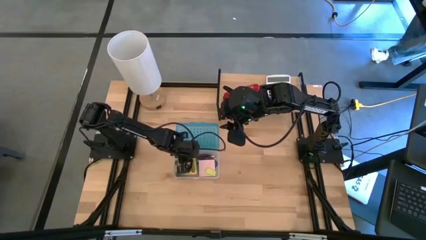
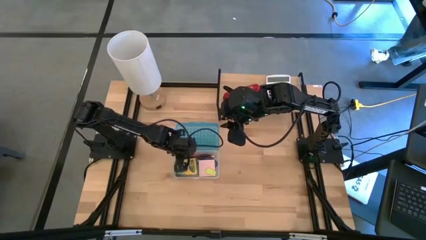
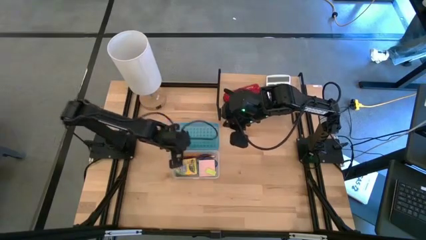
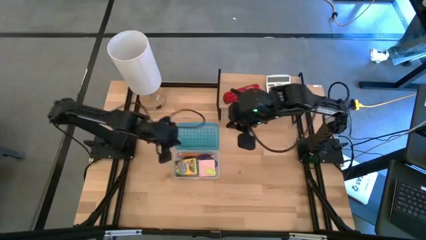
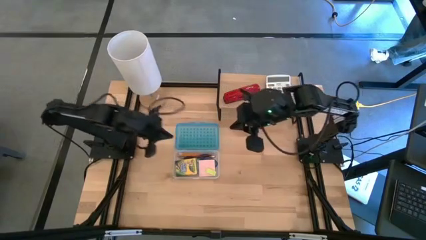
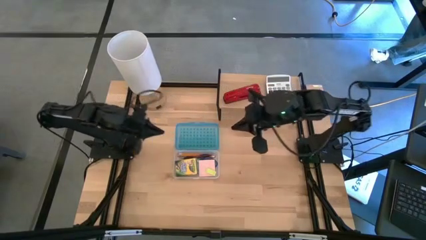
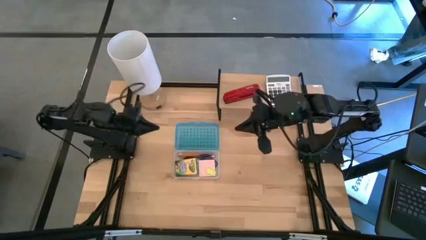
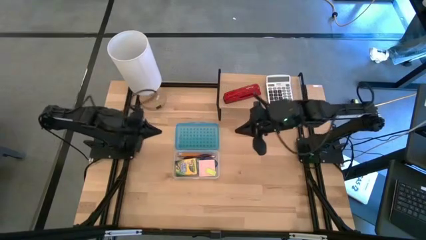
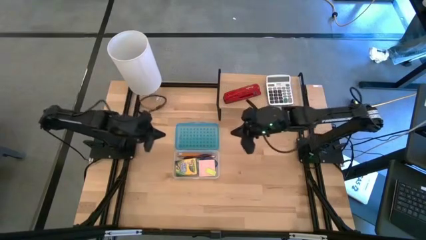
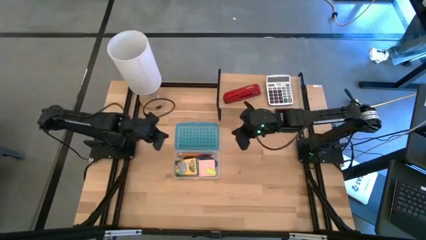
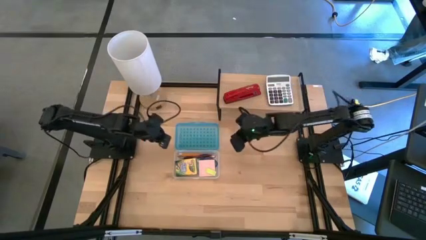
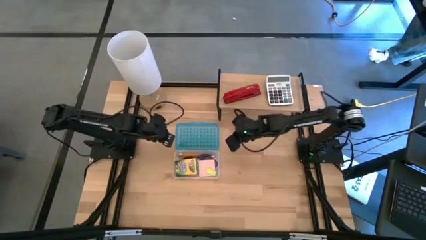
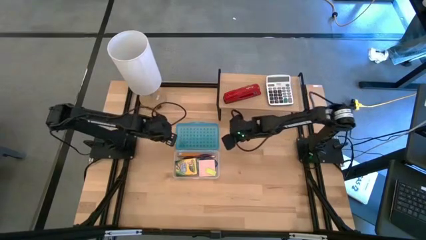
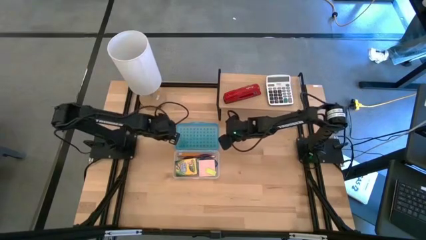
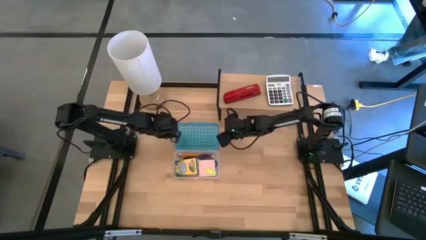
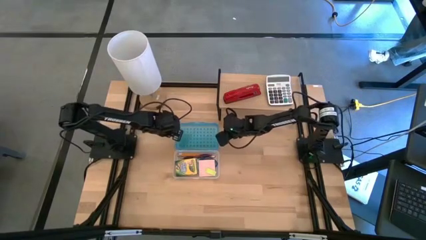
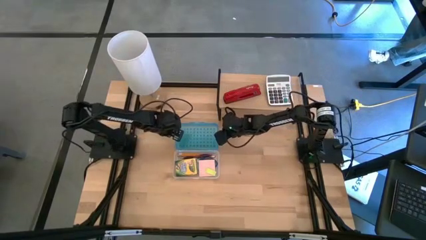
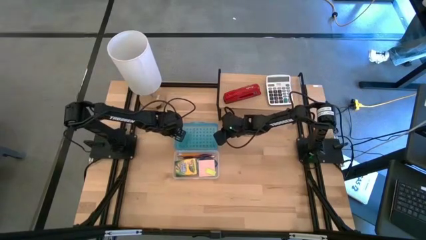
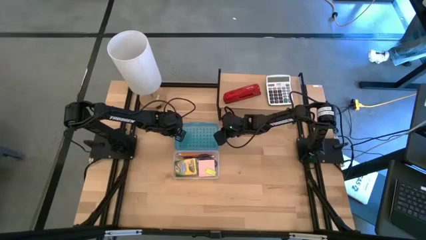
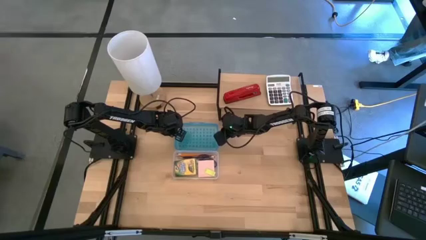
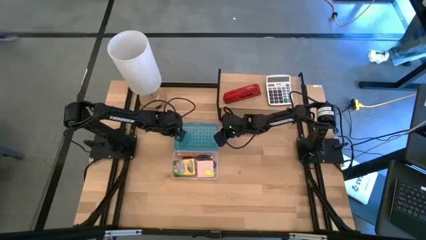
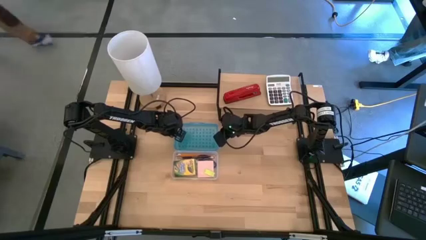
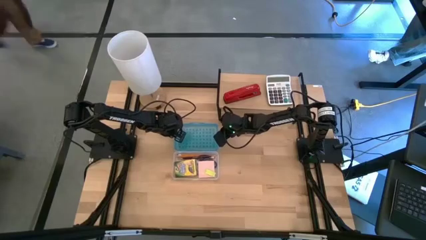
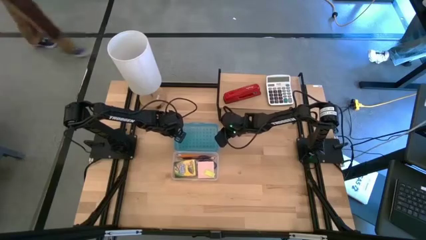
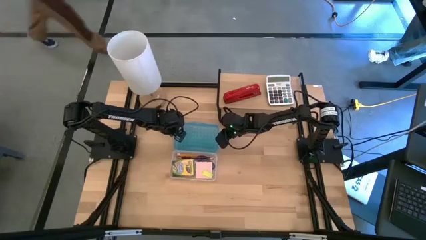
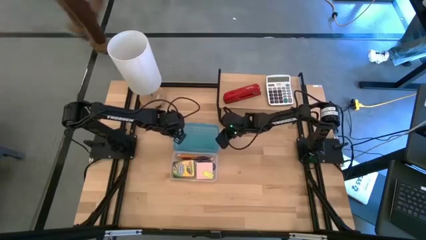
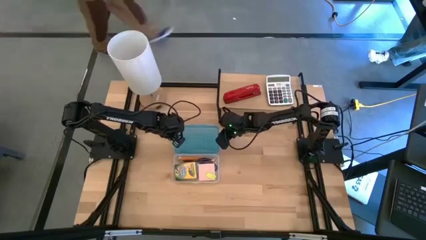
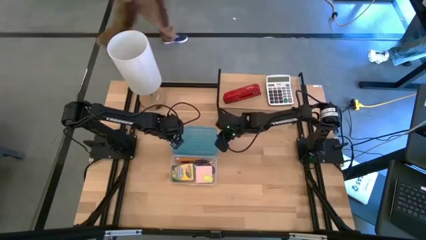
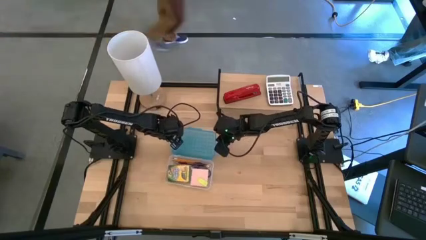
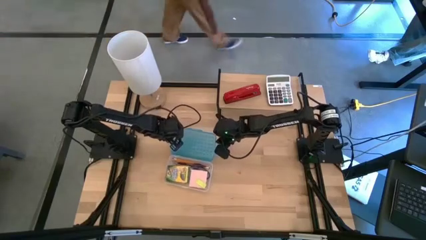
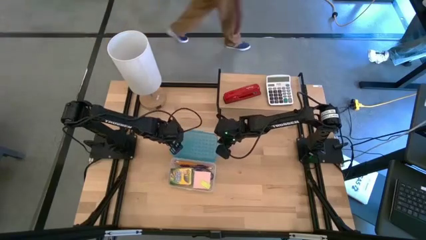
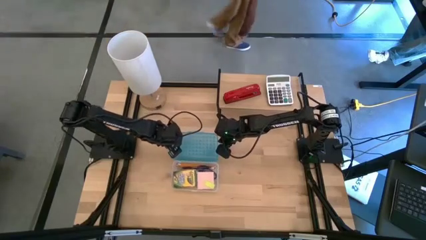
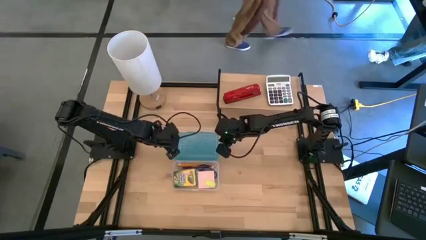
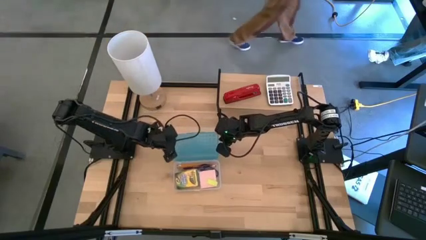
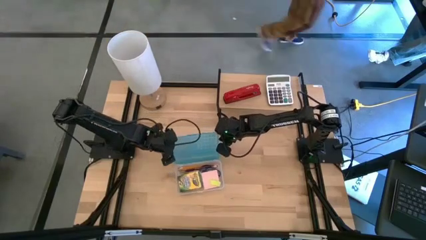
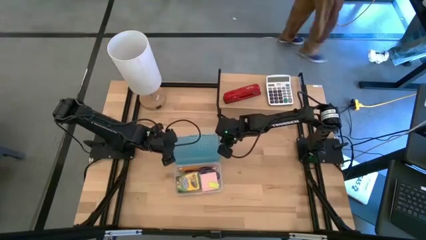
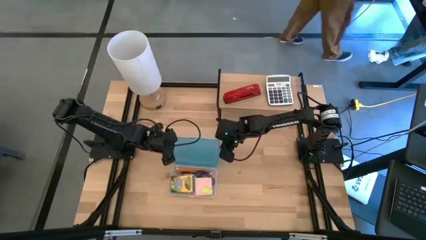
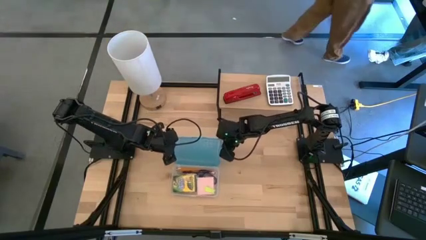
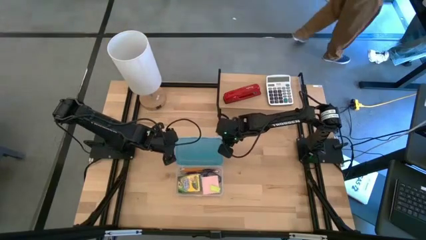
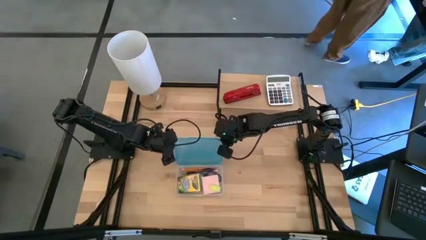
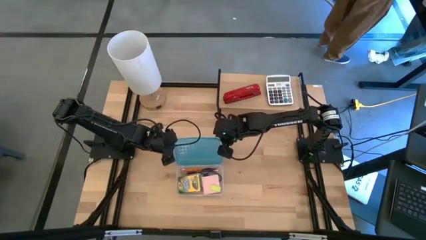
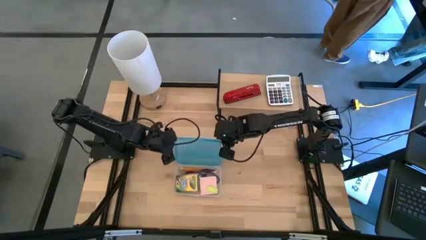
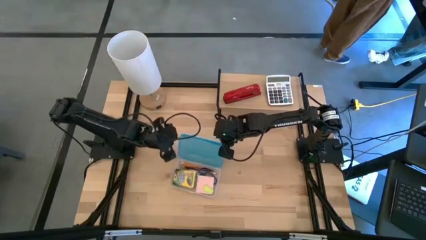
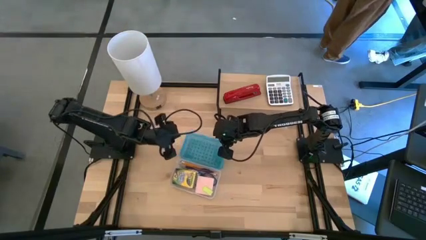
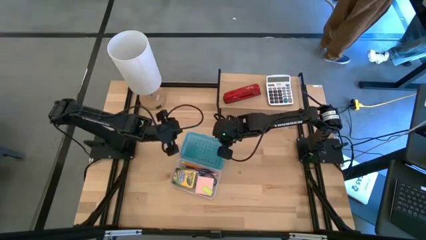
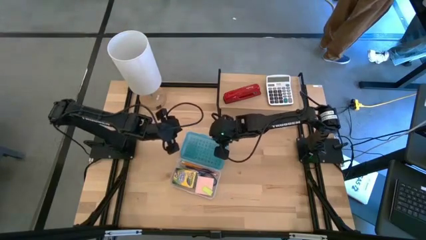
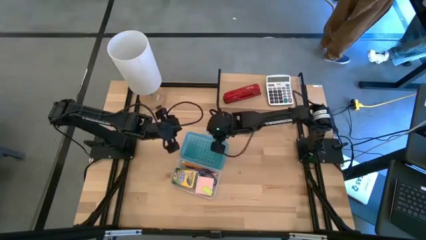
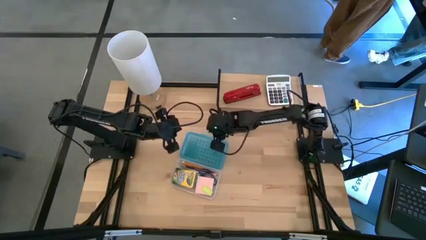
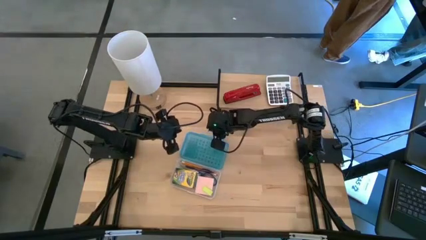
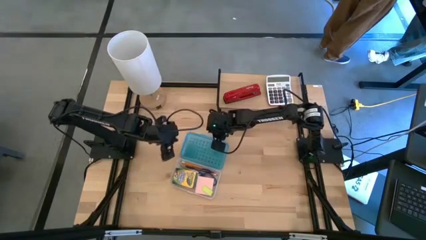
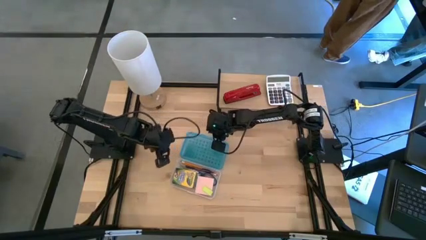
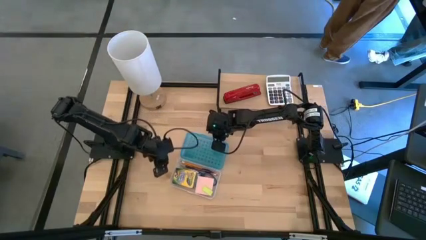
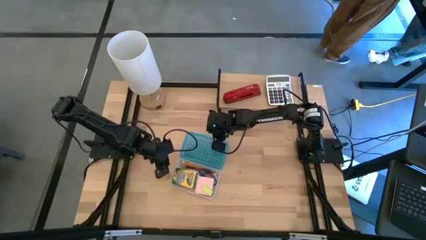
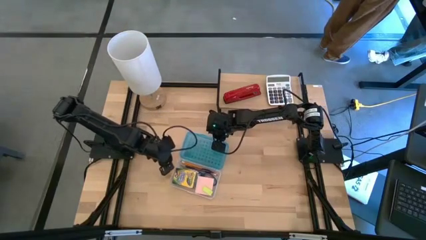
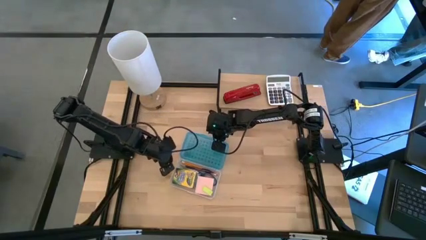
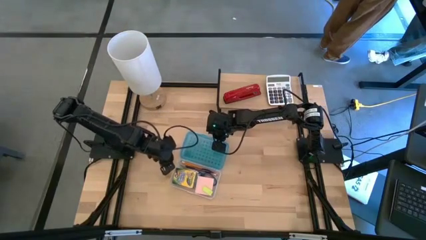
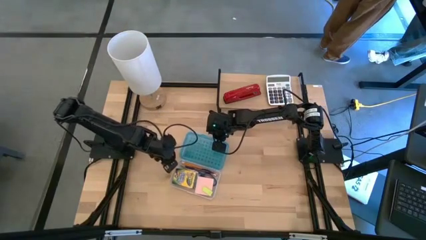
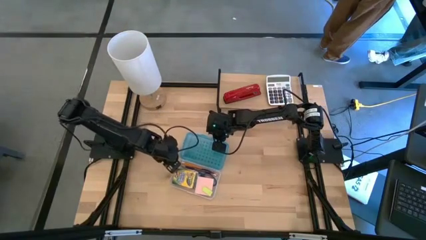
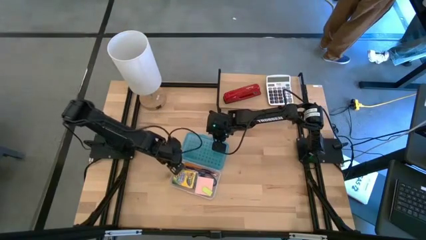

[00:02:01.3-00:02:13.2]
Task: Pack school essentials
Close the blue supply box

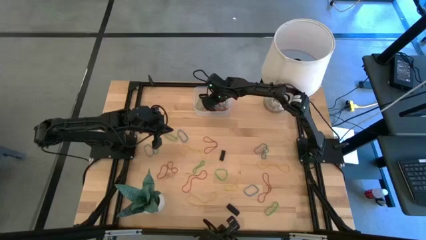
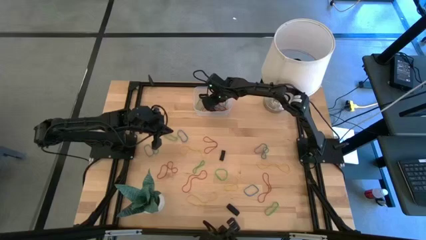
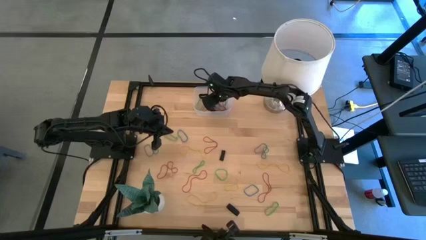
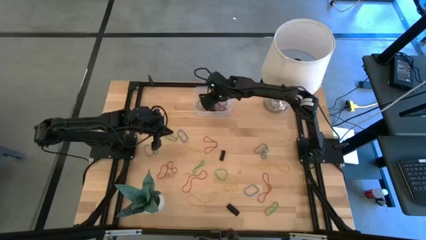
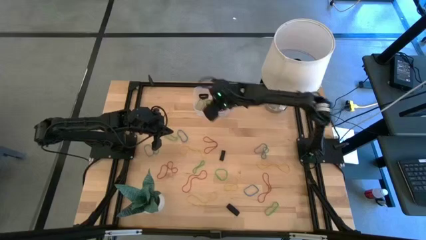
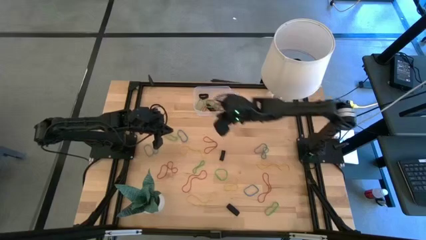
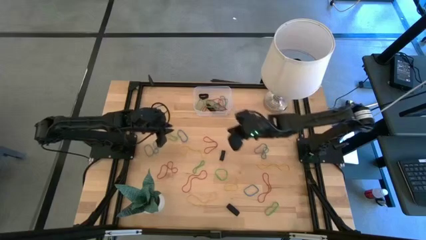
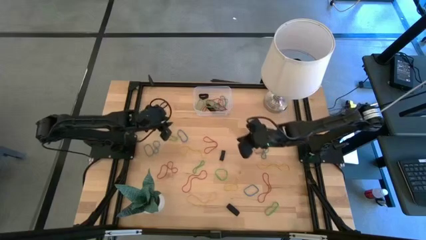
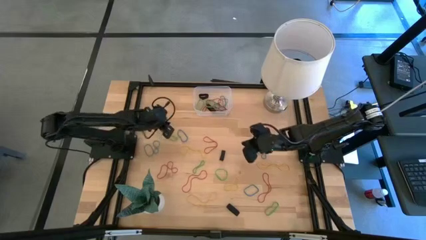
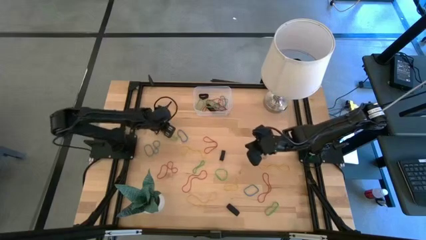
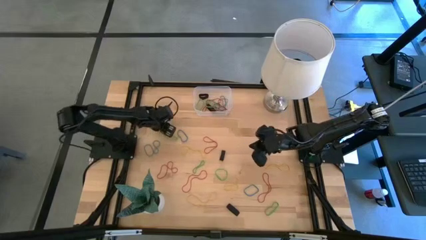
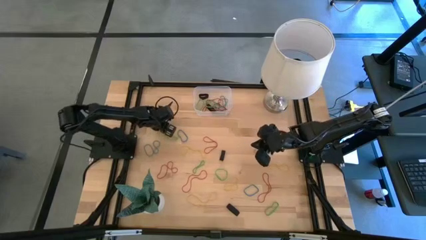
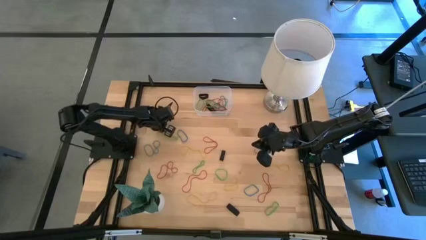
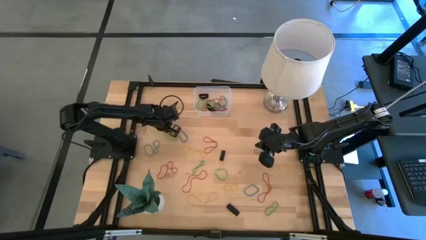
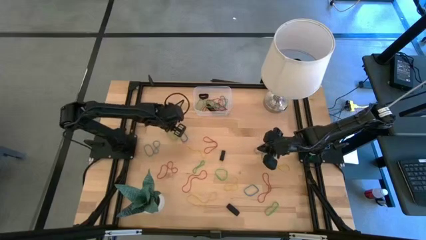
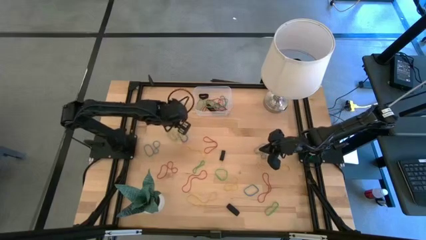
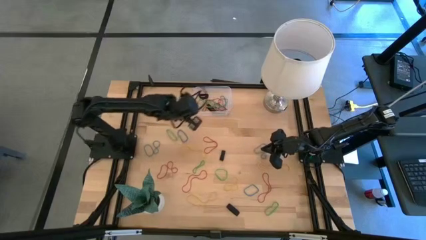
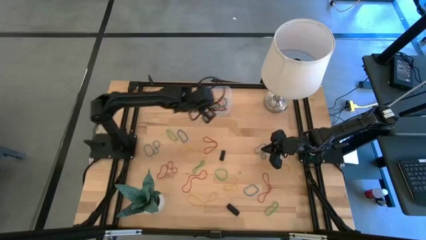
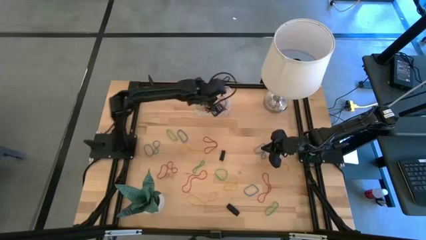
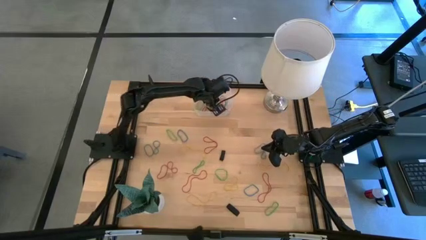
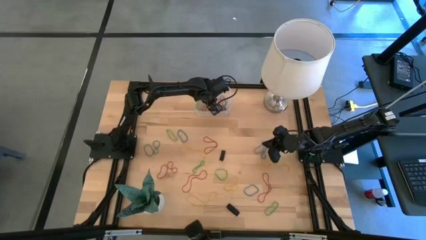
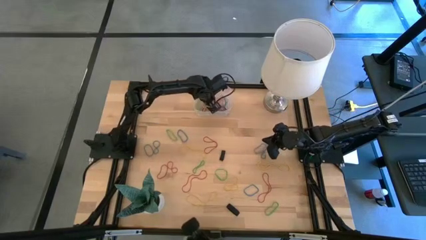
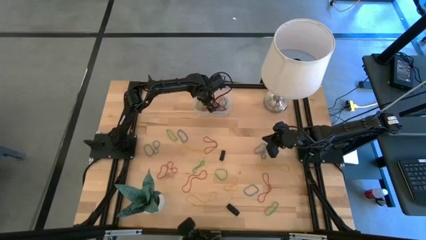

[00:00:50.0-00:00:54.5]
Task: Pick and place rubber bands into bin
Put the yellow rubber band into the transparent bin
